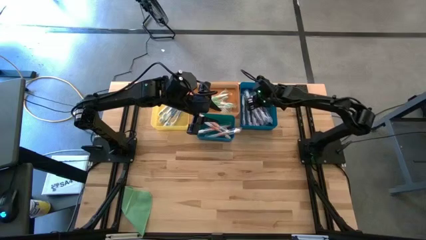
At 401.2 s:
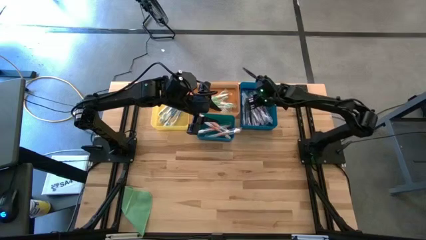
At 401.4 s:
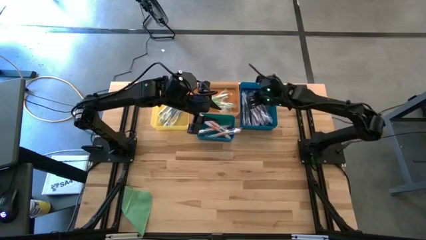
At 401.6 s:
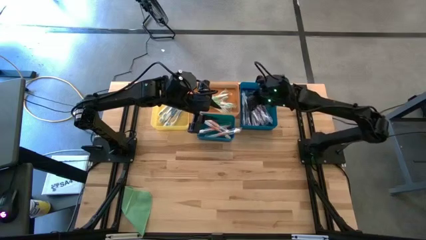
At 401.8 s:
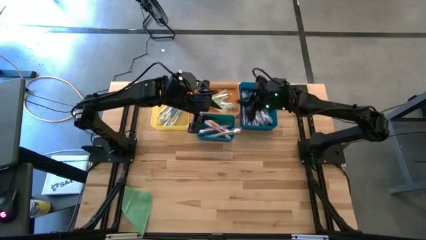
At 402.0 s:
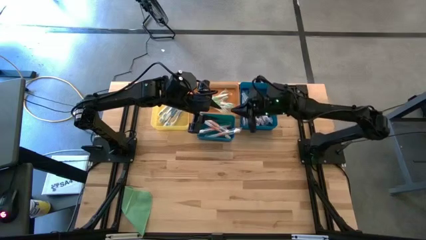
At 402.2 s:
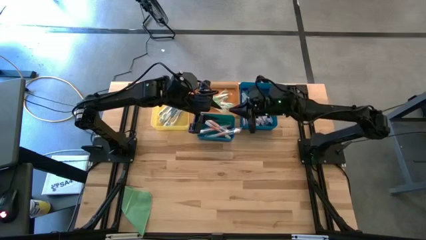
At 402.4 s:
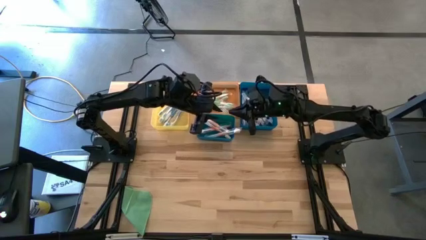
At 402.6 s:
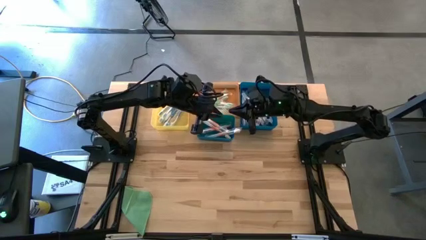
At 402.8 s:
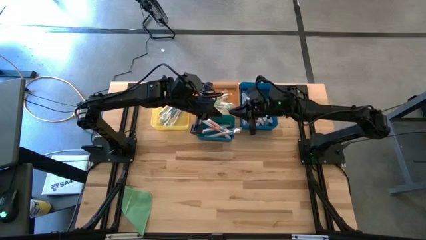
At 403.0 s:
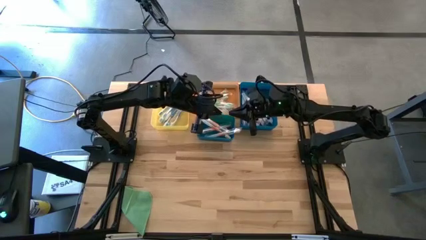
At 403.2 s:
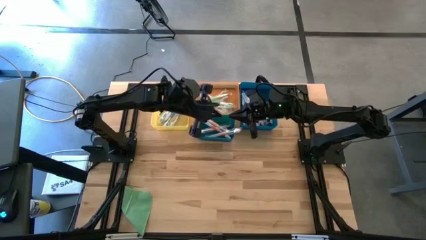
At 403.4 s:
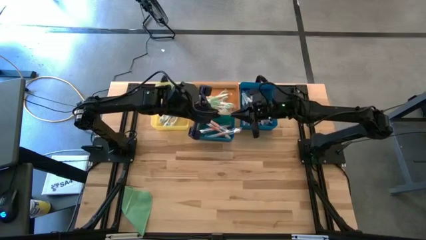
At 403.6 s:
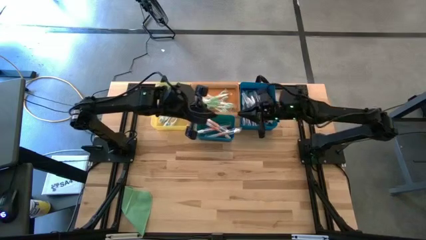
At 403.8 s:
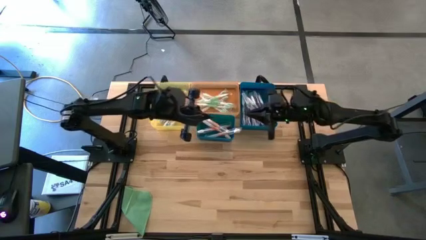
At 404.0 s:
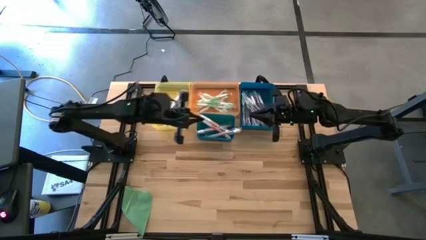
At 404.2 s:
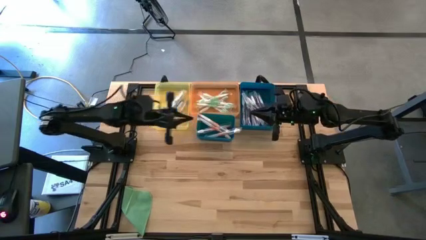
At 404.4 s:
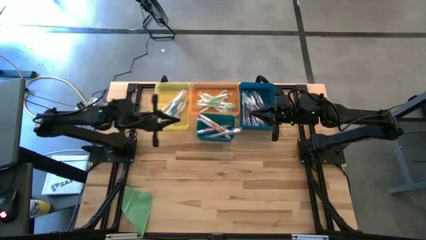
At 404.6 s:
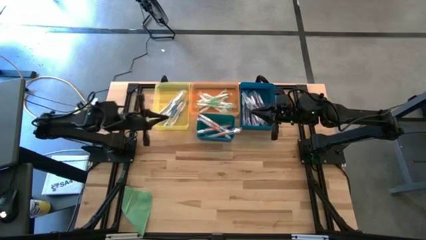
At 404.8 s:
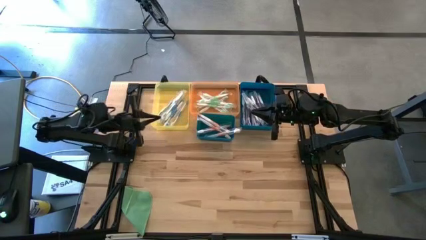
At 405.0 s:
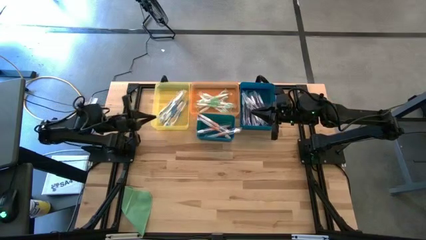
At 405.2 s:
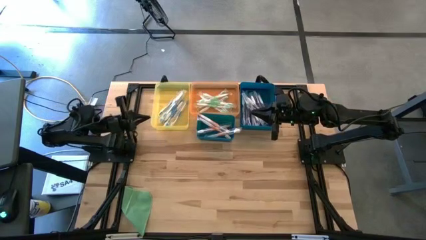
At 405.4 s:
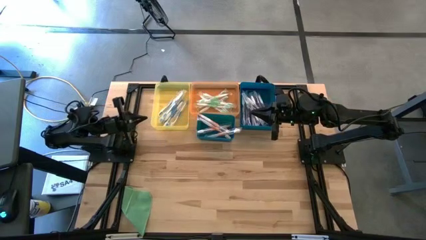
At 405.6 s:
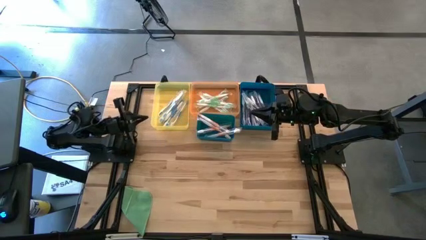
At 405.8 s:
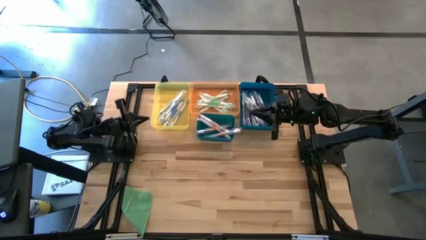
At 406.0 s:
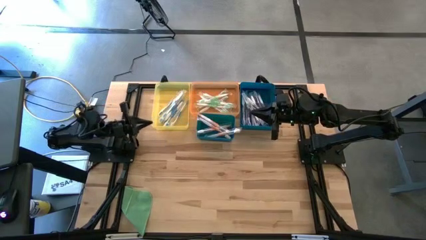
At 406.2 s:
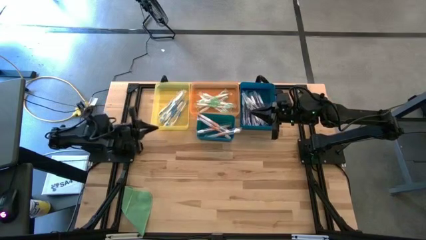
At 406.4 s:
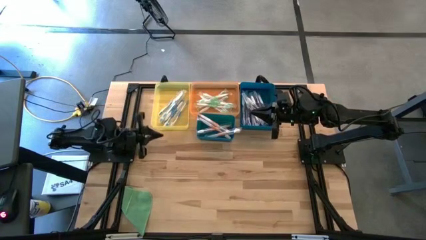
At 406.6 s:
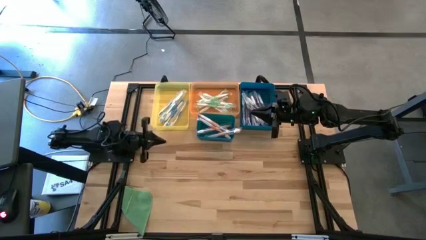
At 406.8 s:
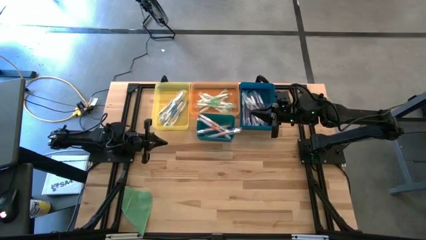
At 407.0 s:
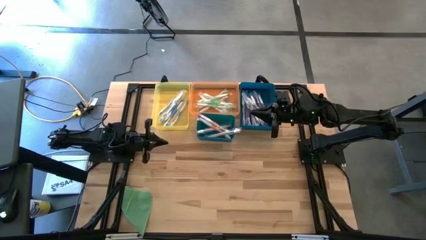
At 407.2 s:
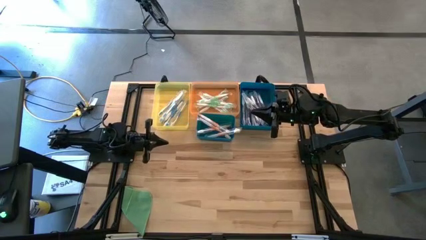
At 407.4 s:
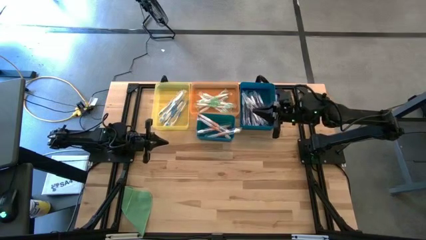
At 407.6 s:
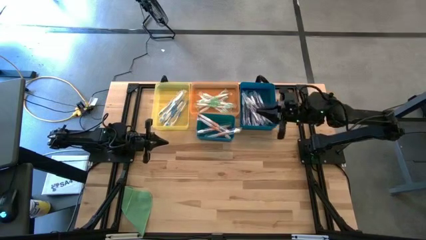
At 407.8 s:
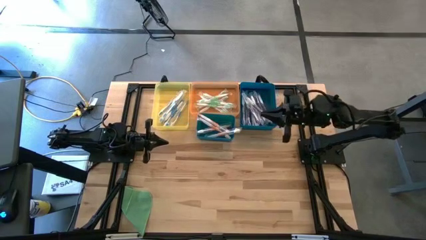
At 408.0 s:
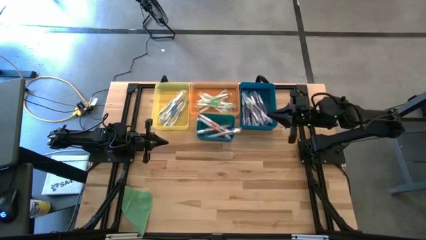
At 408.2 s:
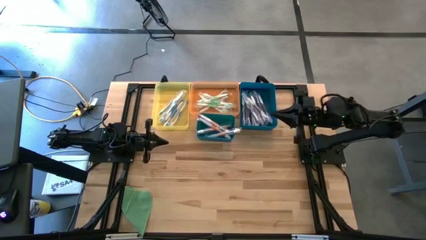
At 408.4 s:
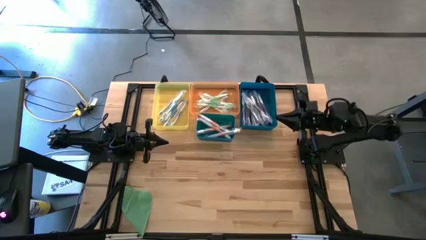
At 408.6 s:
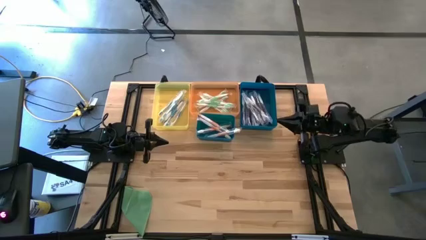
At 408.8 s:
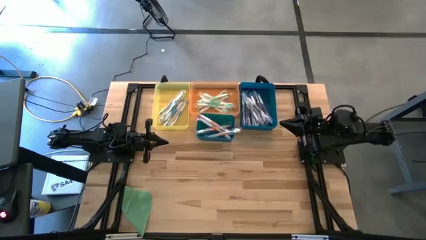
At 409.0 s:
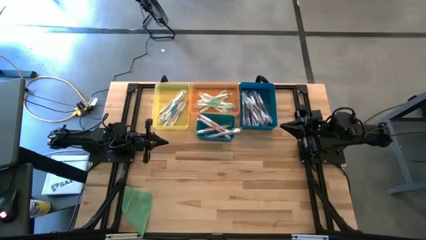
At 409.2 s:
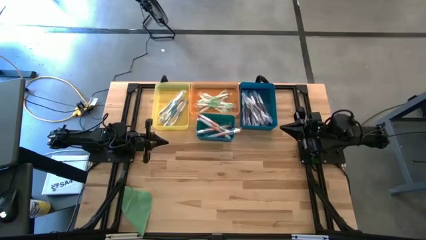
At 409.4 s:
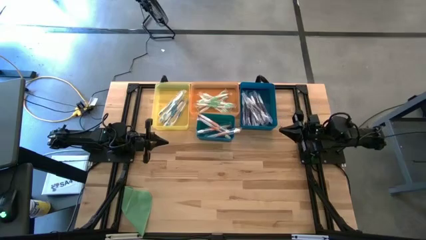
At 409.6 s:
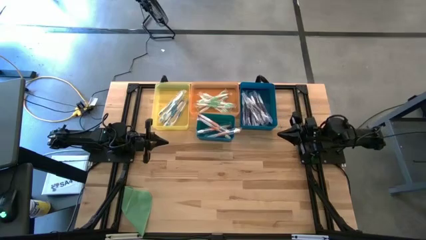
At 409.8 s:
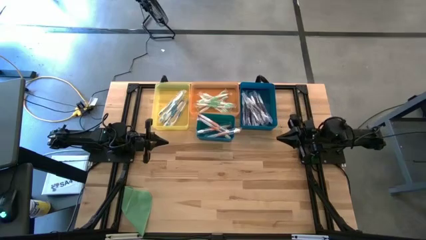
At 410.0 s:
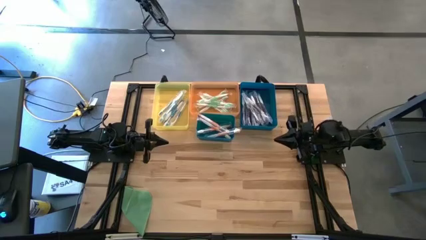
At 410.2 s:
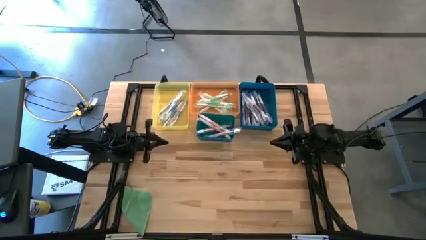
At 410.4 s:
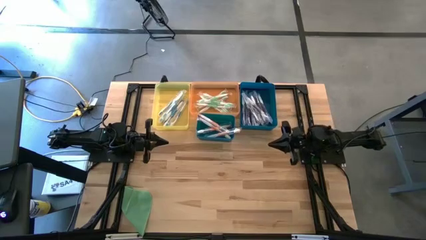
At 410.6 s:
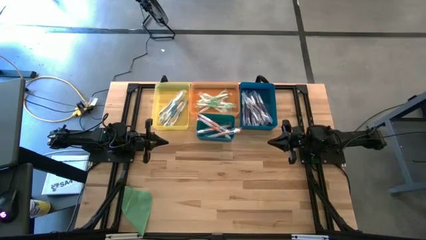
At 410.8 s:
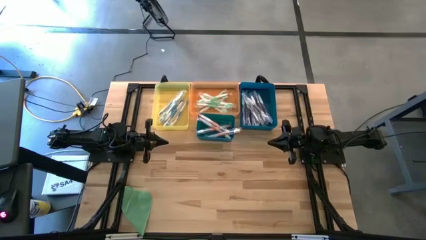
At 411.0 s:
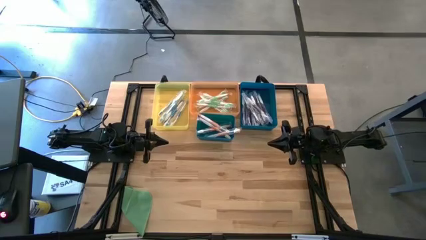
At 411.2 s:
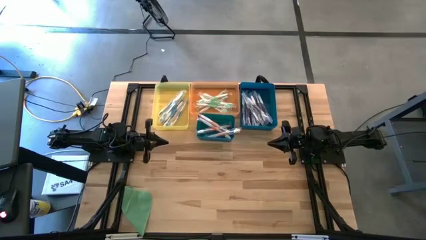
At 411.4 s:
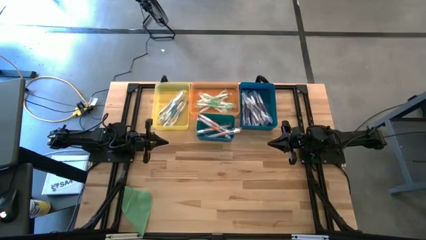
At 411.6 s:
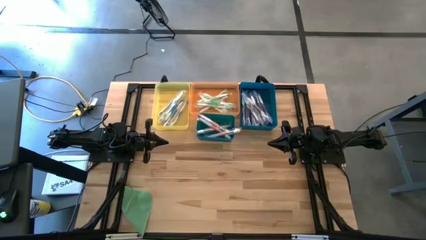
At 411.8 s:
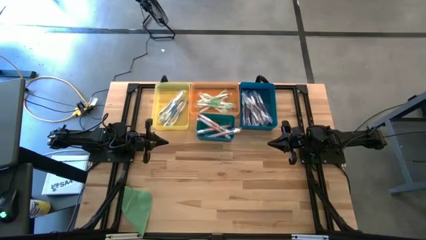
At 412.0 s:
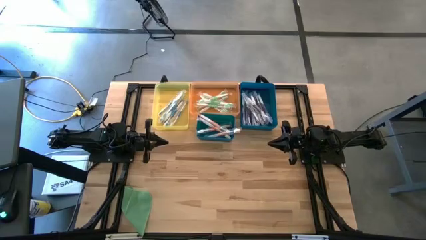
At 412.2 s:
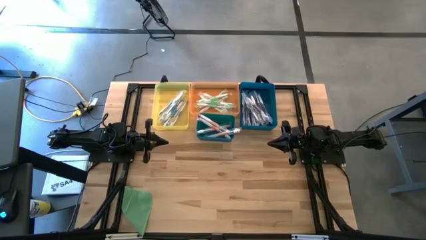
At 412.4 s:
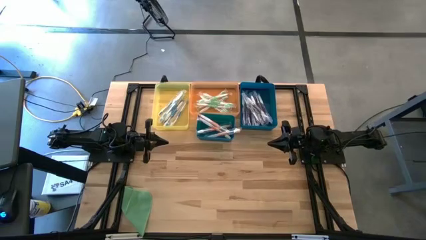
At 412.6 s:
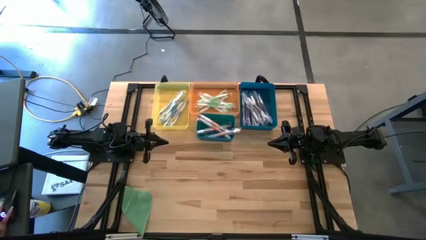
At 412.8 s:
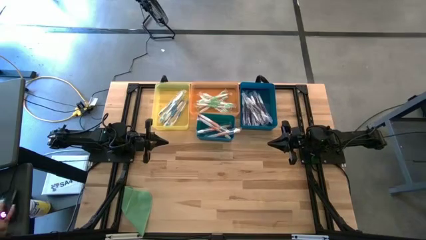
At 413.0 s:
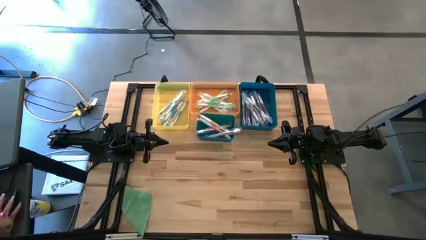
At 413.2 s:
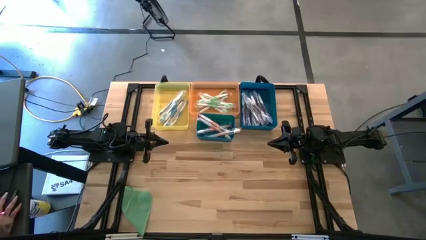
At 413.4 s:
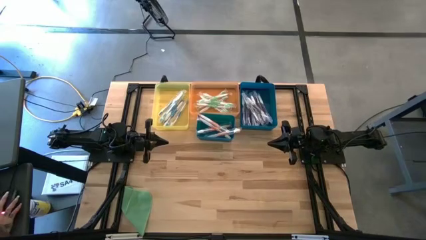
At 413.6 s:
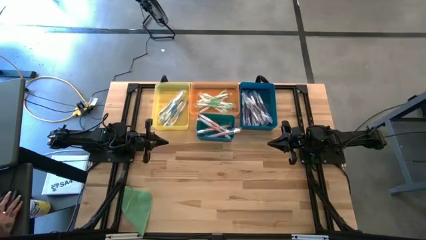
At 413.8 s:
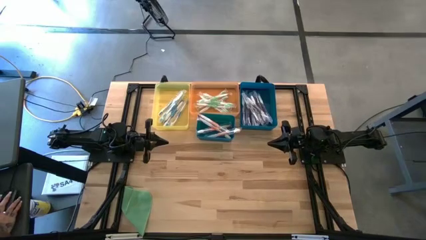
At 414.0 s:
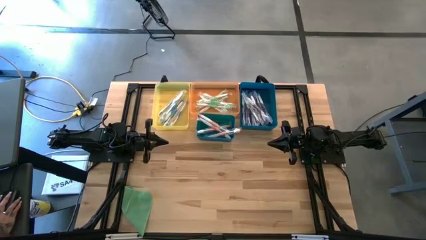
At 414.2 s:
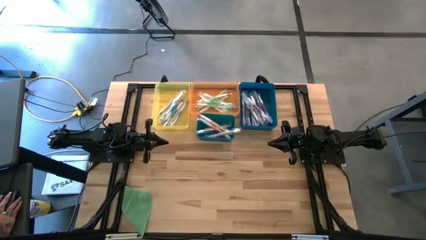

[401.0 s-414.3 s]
Task: Pick & Place Toothbrushes
Return to Home Position
